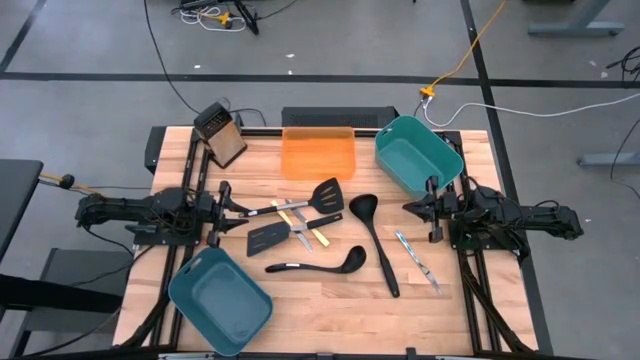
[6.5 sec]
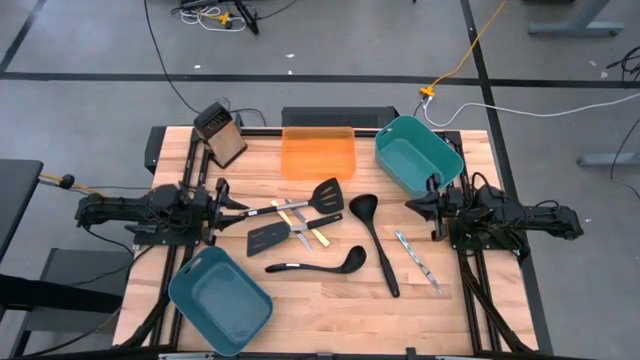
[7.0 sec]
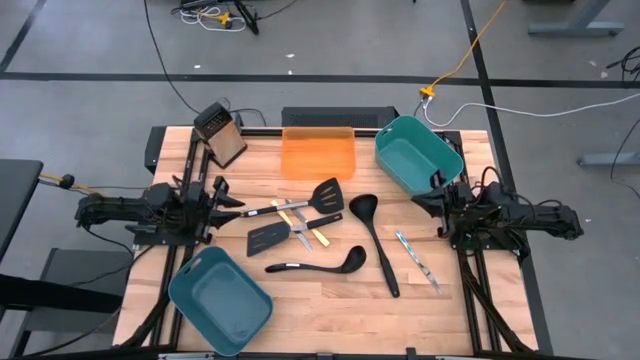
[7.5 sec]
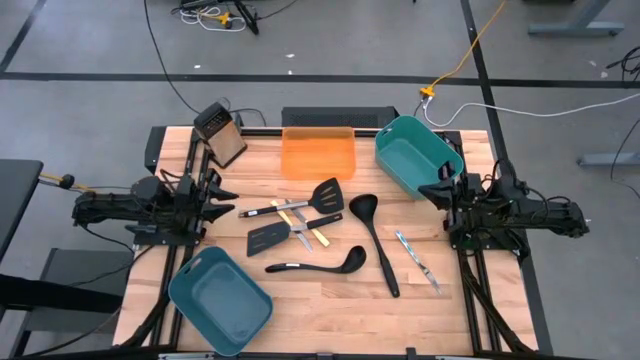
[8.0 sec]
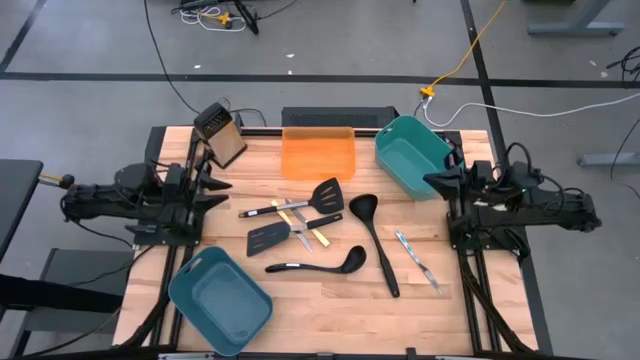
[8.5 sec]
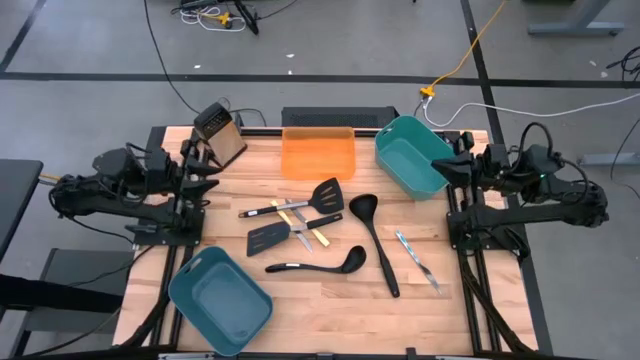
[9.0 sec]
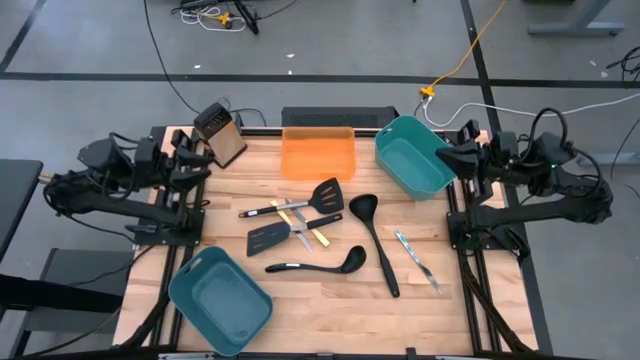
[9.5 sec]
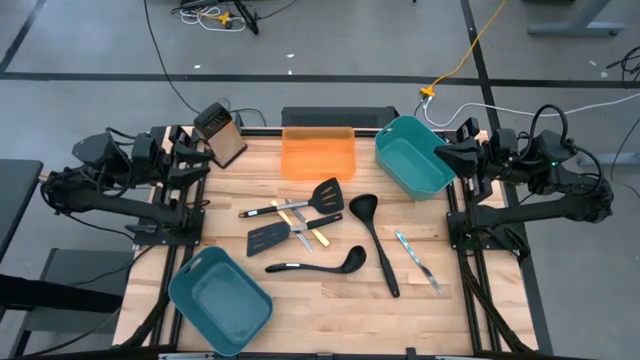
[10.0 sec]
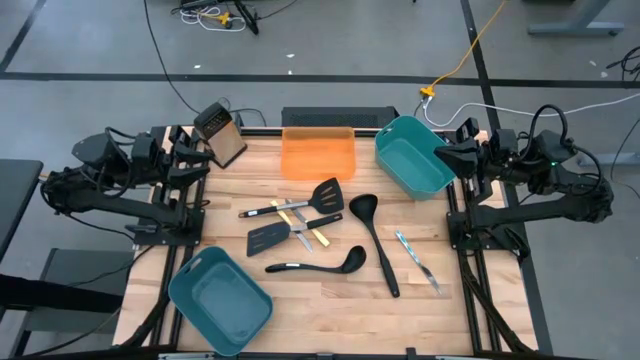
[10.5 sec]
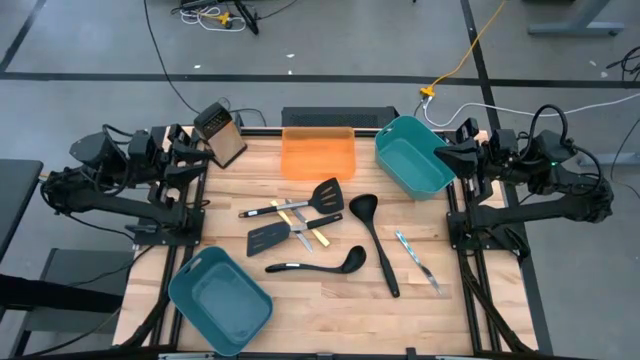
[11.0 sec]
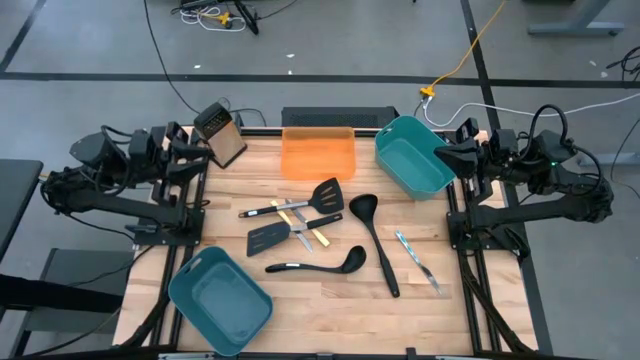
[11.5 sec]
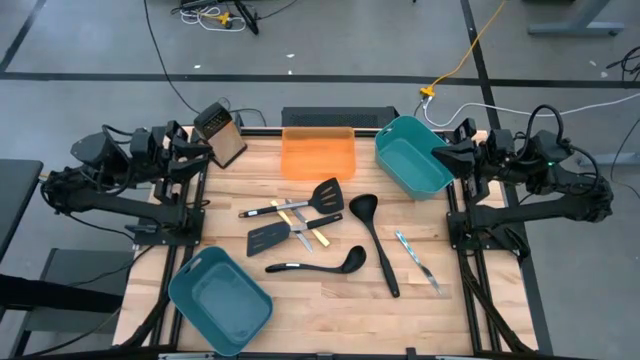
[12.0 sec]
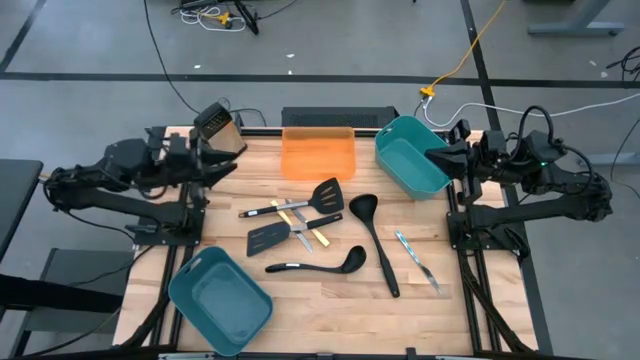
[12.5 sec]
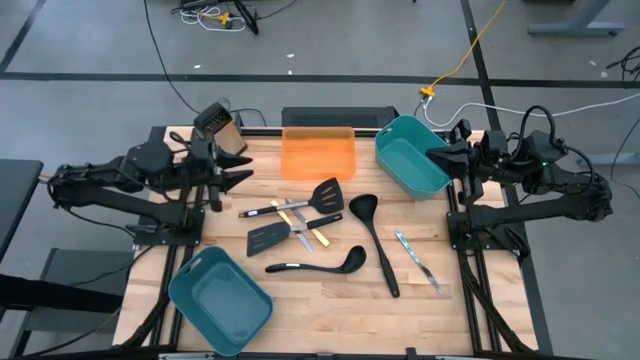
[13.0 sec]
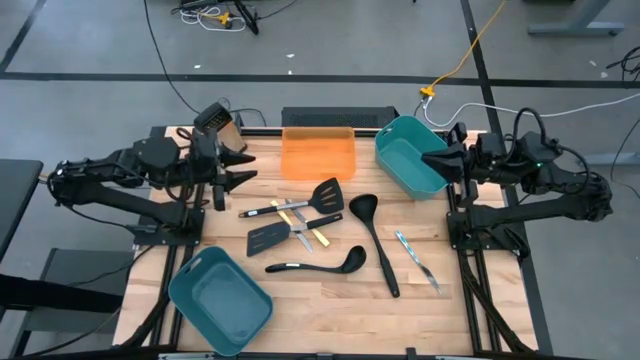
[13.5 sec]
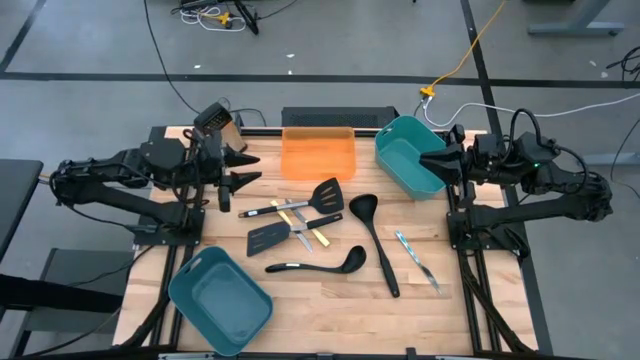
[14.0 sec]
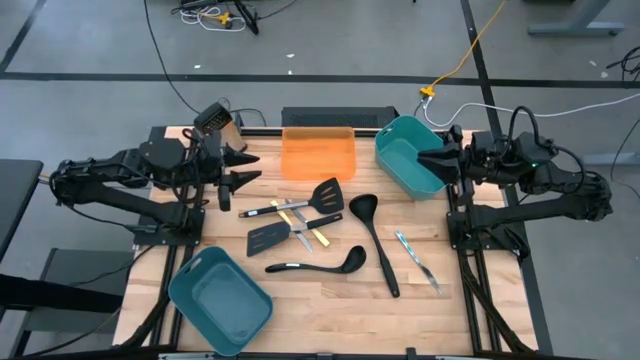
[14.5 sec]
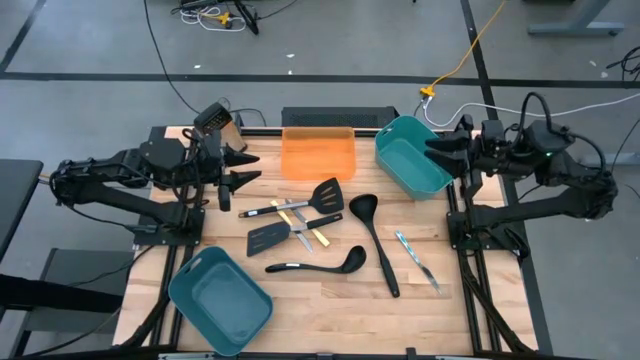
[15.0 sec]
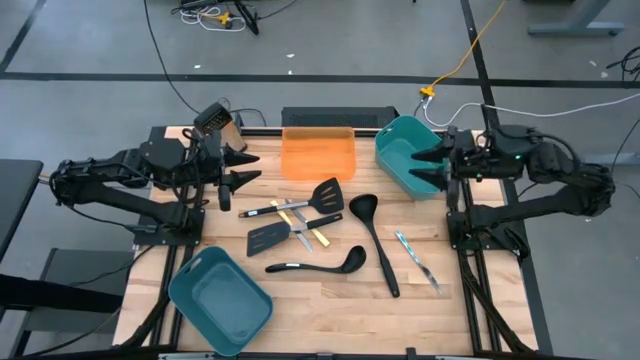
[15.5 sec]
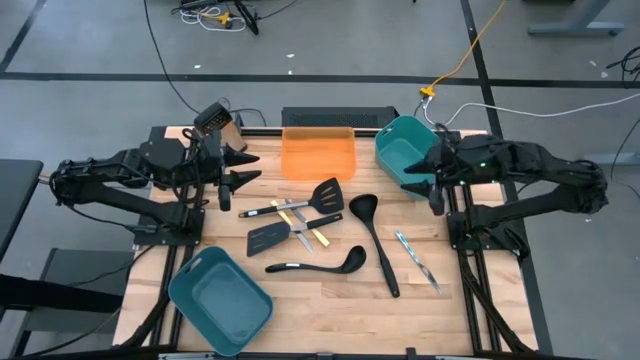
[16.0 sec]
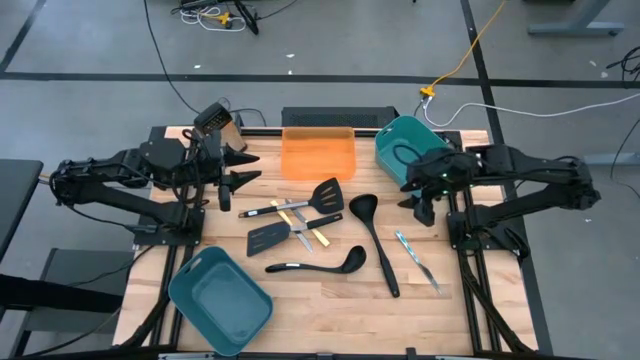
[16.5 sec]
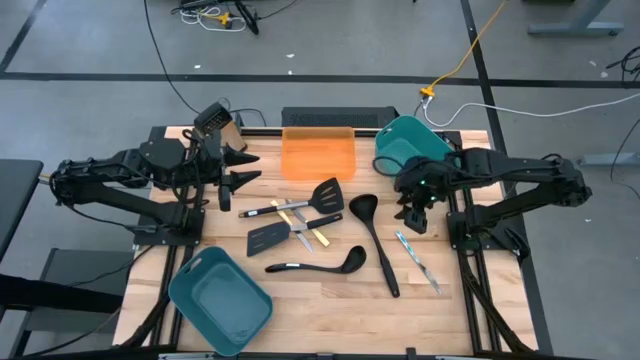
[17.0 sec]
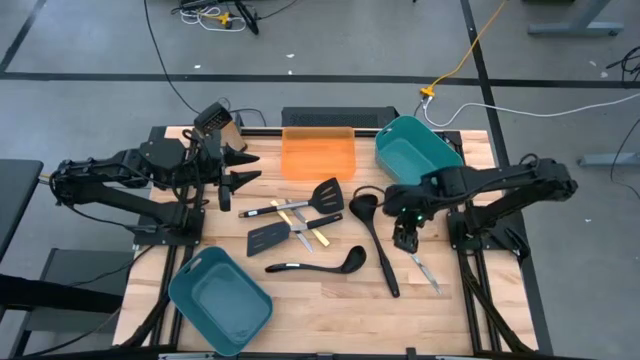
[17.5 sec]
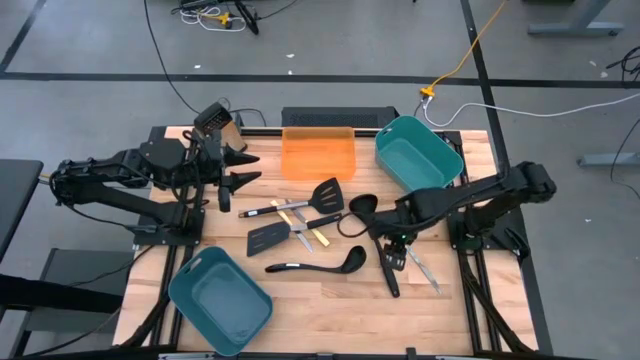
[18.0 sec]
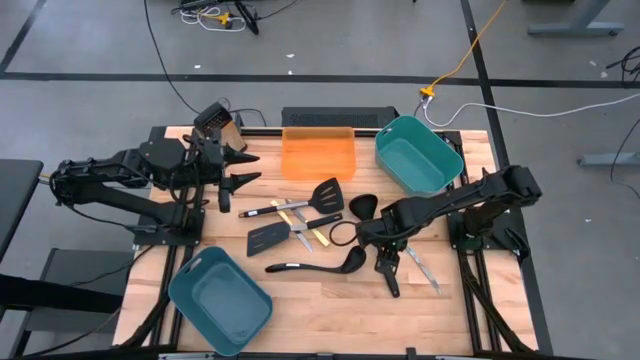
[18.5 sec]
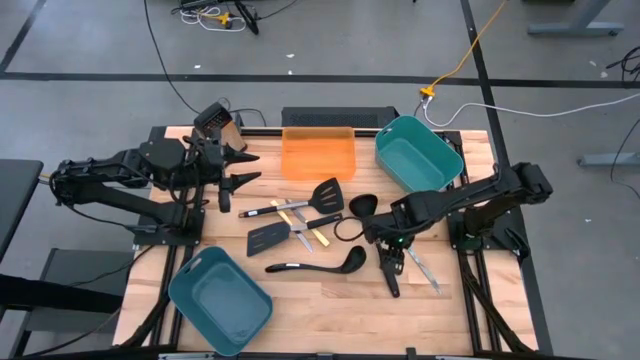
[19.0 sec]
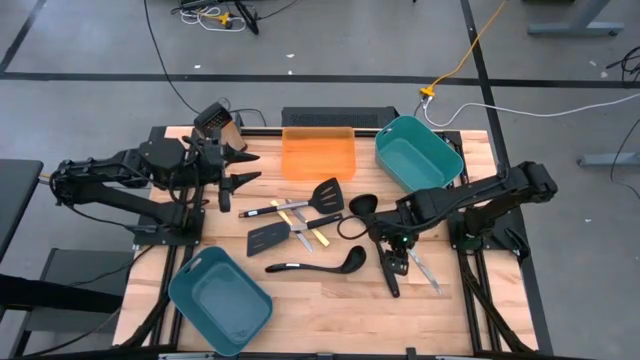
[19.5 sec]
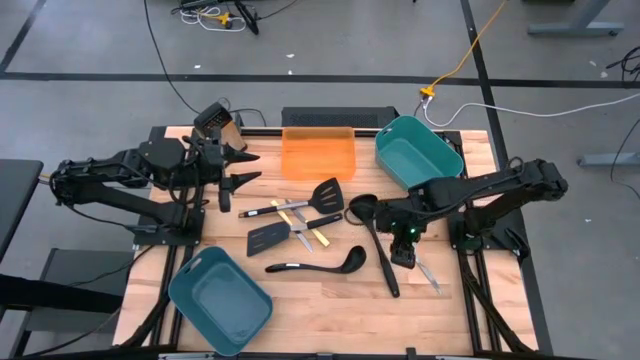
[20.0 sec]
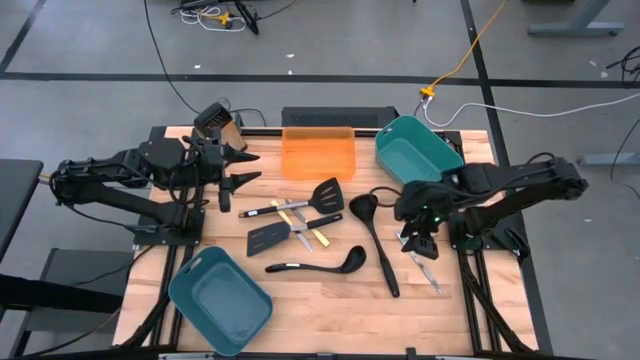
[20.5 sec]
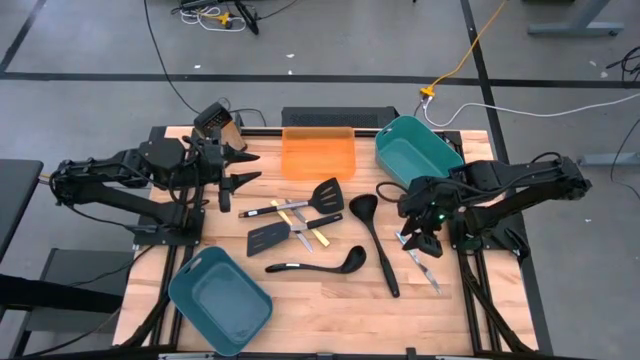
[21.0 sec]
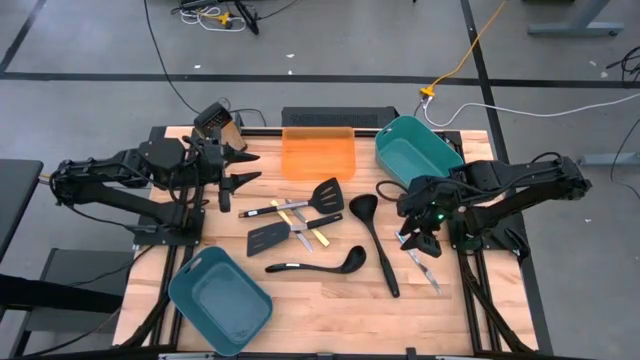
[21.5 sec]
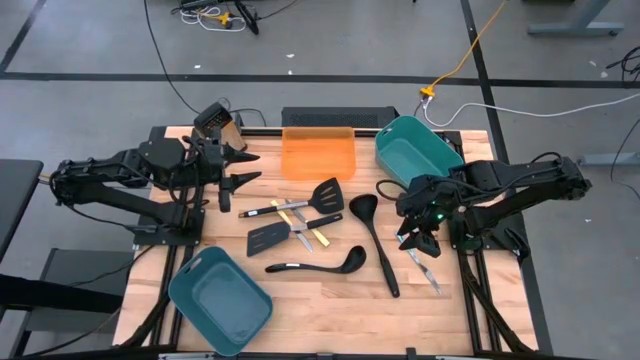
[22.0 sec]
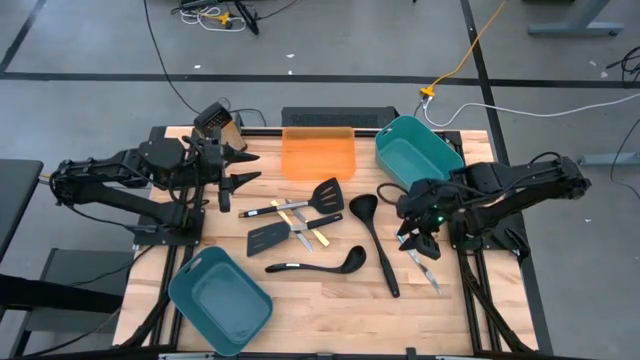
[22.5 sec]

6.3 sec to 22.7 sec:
Task: Pick & Place Kitchen Items
Put the right black ladle into the blue bin

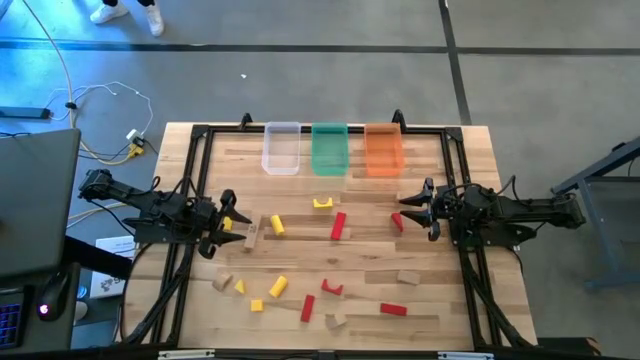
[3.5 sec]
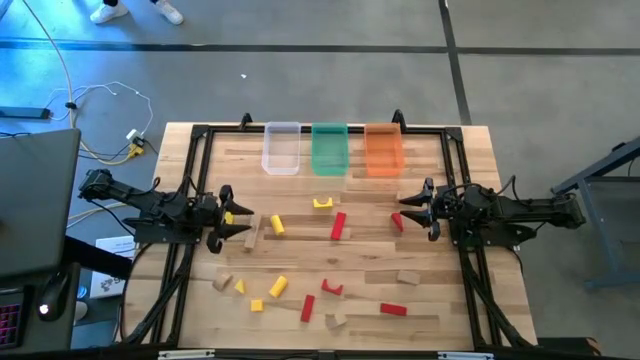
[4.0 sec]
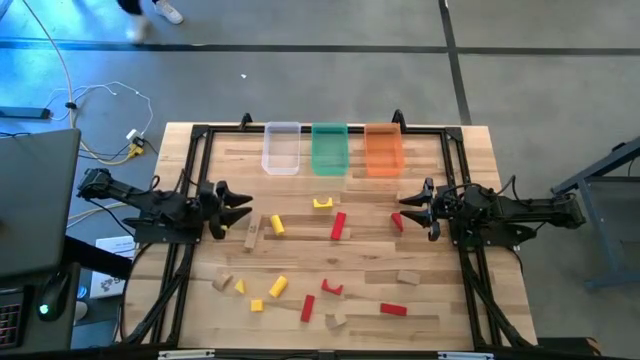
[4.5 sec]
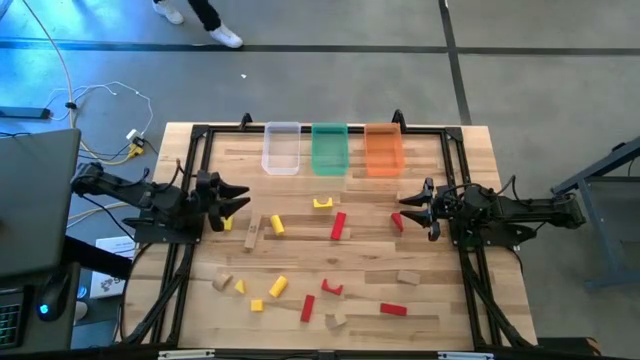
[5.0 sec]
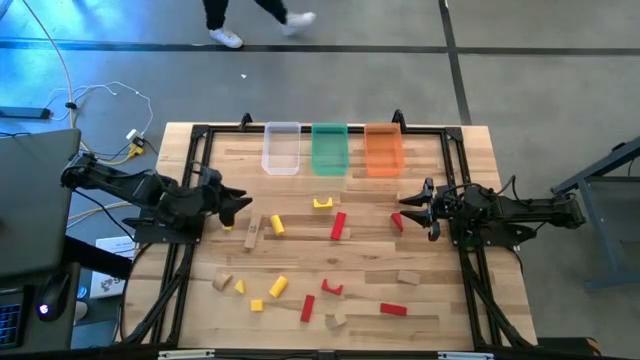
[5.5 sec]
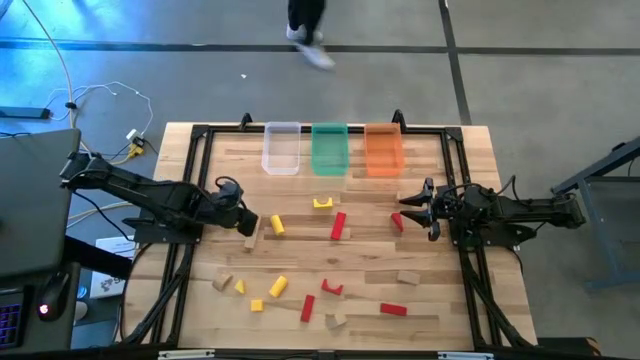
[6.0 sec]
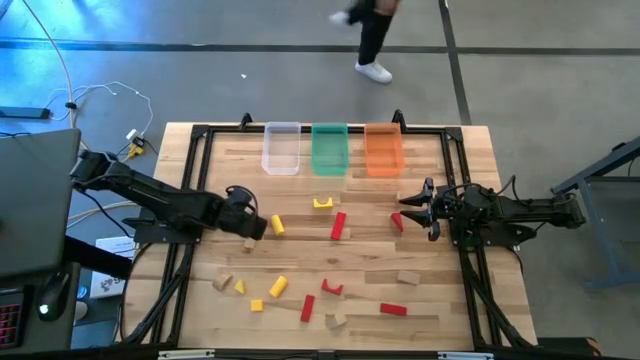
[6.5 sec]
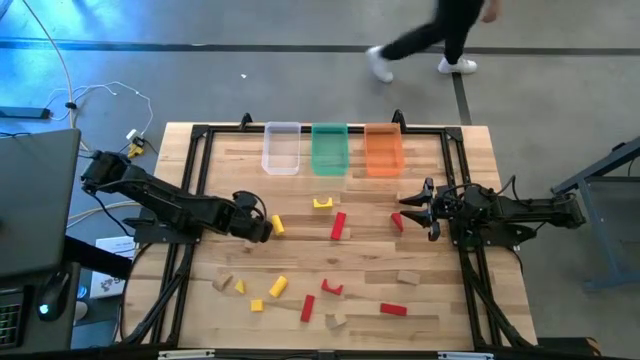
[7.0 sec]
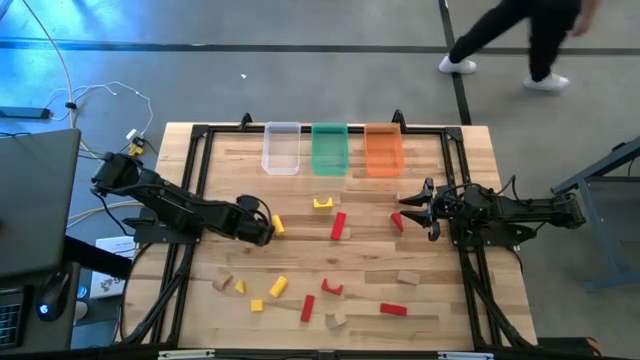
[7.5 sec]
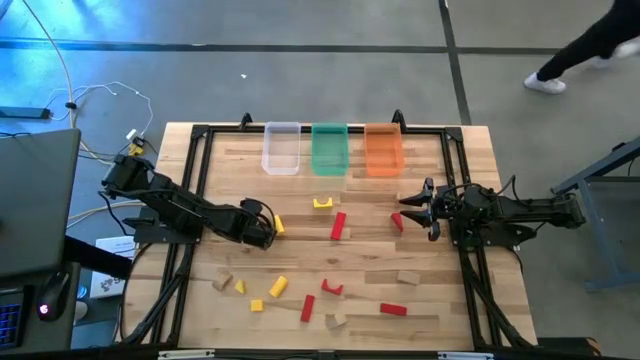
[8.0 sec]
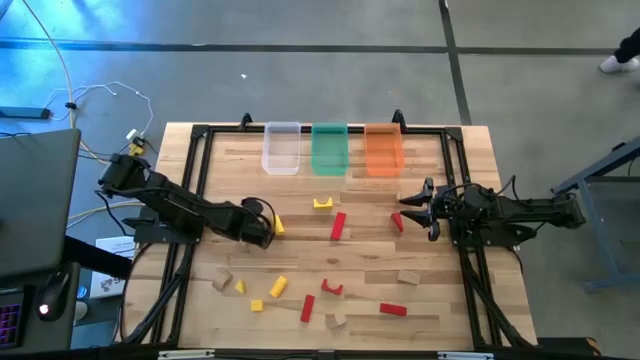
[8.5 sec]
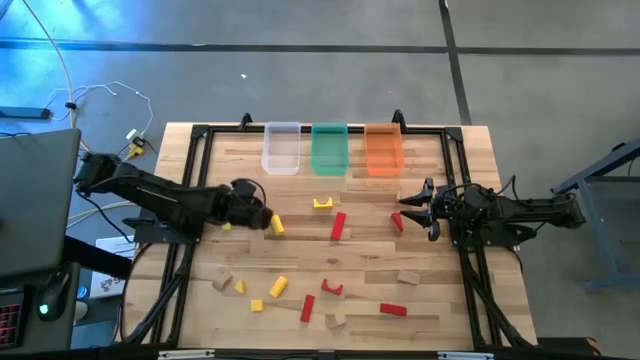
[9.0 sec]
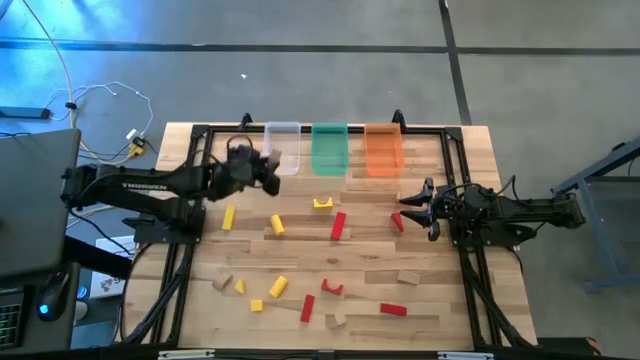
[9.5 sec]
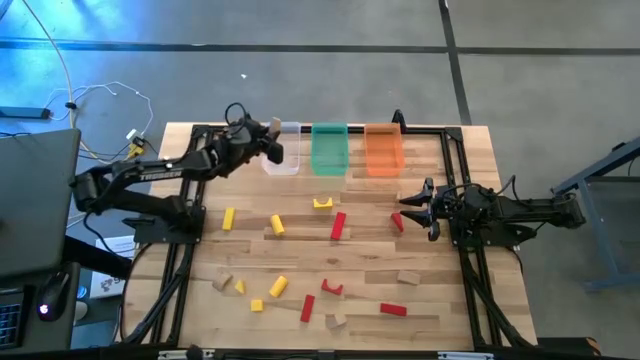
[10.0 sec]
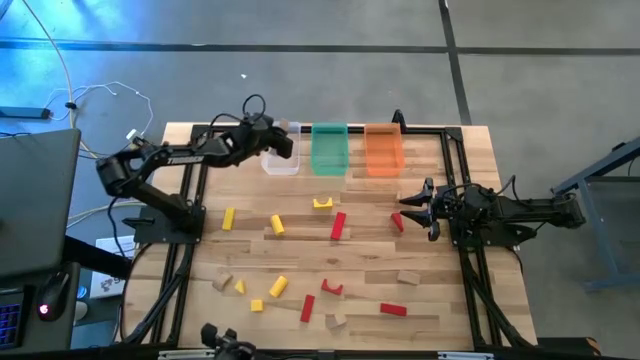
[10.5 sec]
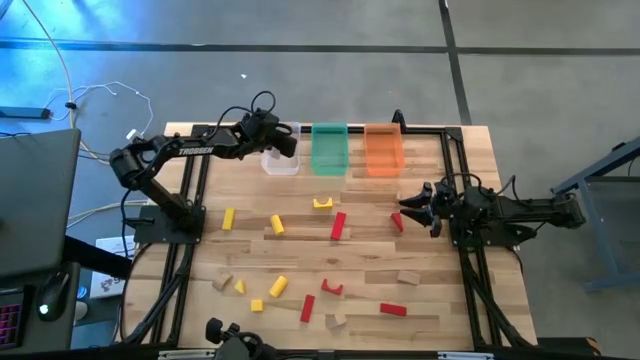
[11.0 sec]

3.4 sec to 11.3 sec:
Task: Sort & place blocks by color
Put the brown block into the white transparent bin
